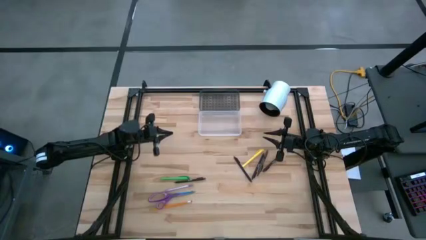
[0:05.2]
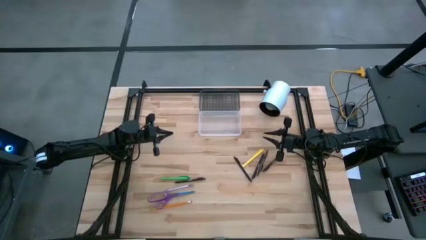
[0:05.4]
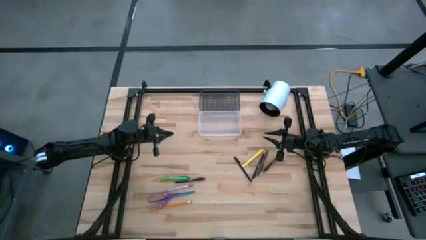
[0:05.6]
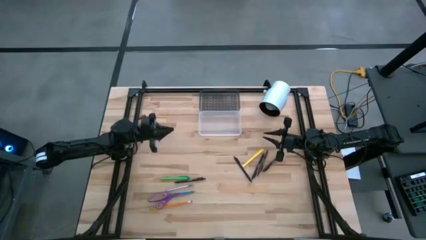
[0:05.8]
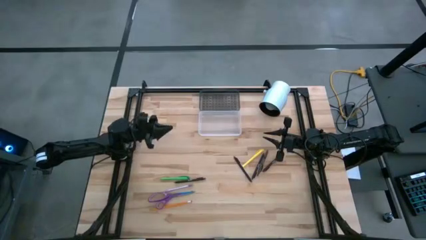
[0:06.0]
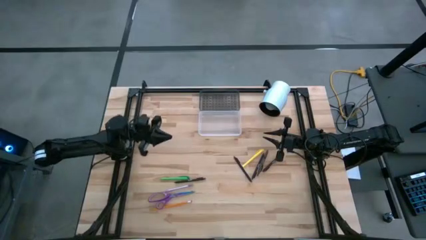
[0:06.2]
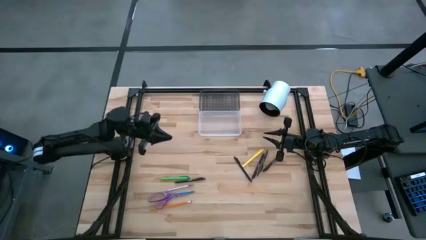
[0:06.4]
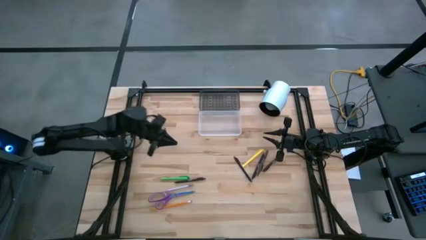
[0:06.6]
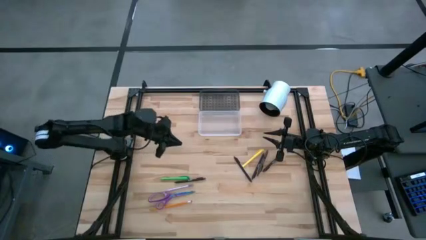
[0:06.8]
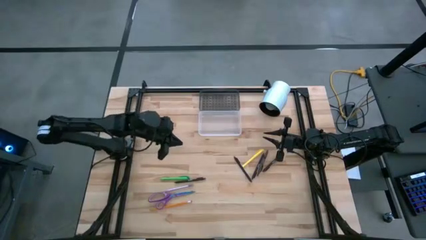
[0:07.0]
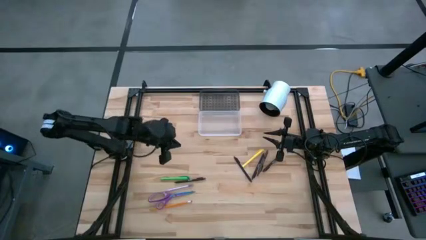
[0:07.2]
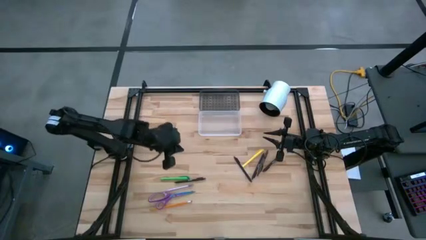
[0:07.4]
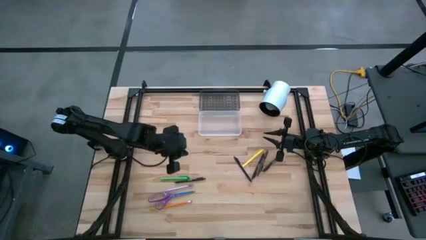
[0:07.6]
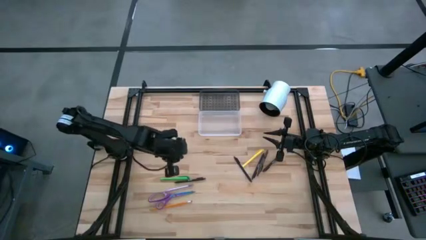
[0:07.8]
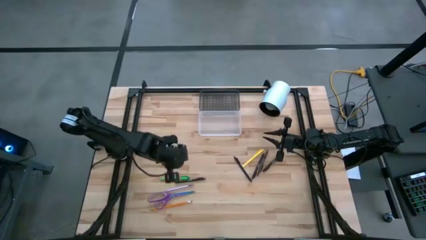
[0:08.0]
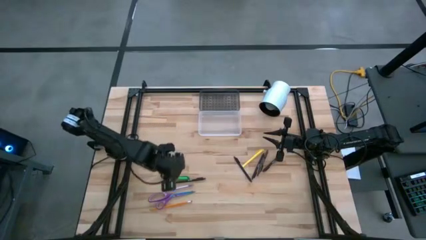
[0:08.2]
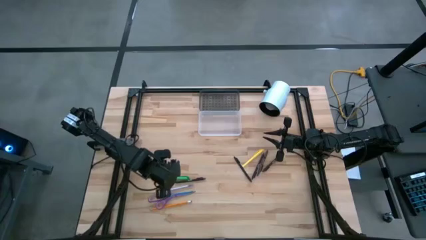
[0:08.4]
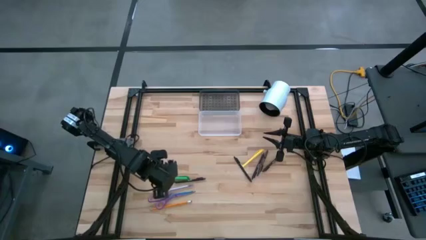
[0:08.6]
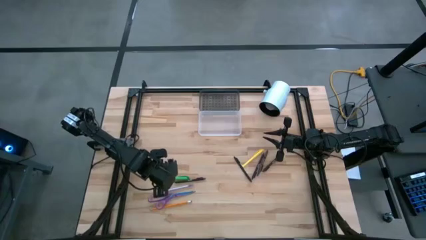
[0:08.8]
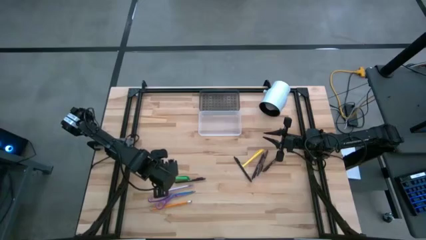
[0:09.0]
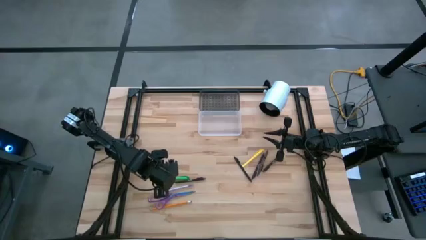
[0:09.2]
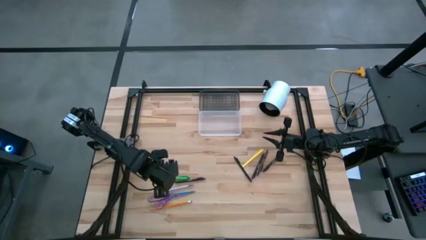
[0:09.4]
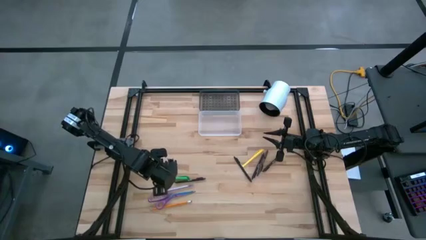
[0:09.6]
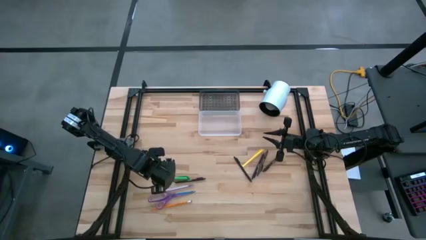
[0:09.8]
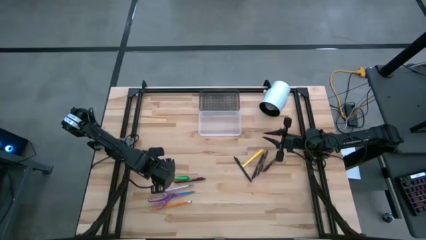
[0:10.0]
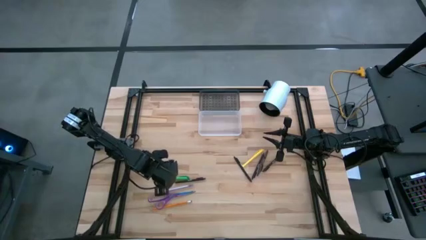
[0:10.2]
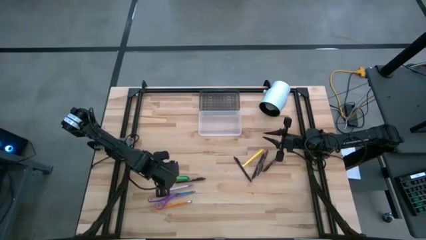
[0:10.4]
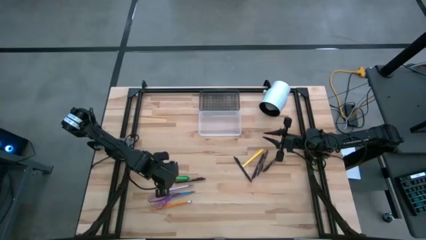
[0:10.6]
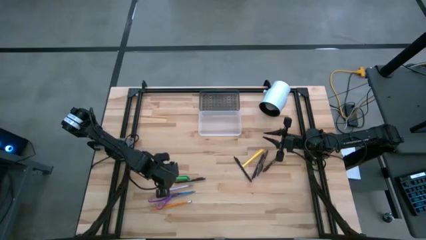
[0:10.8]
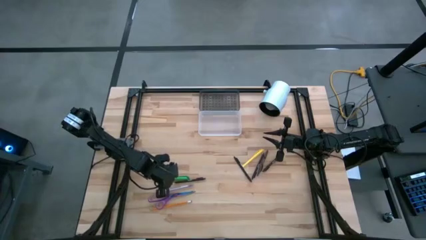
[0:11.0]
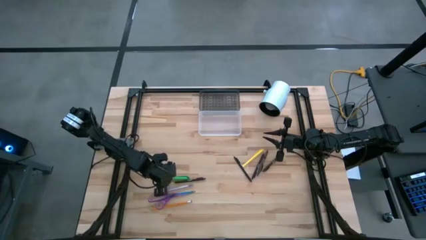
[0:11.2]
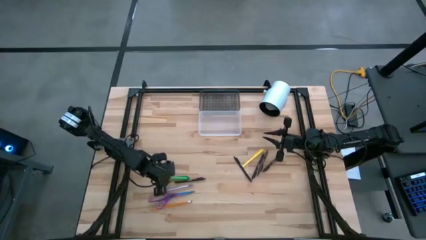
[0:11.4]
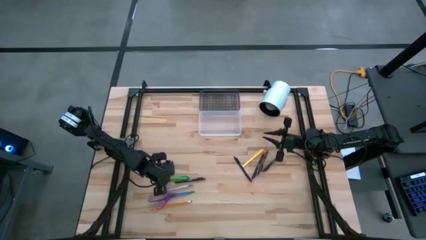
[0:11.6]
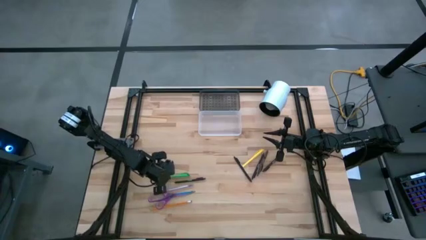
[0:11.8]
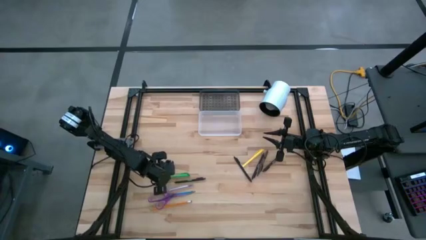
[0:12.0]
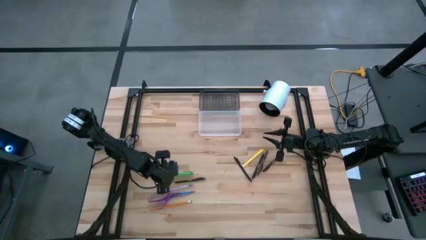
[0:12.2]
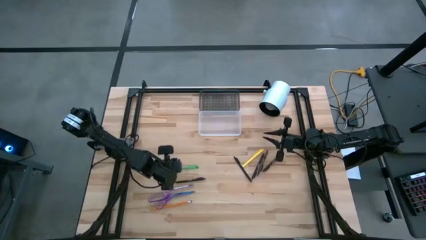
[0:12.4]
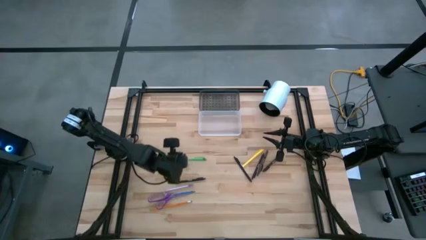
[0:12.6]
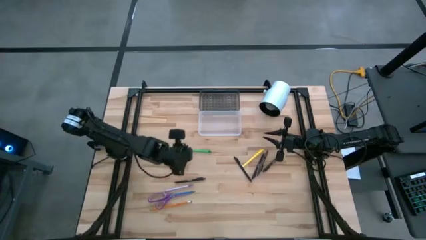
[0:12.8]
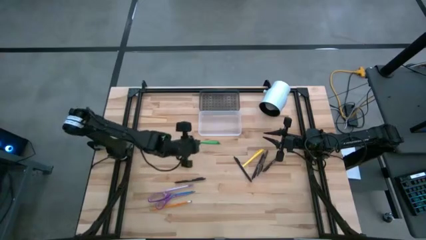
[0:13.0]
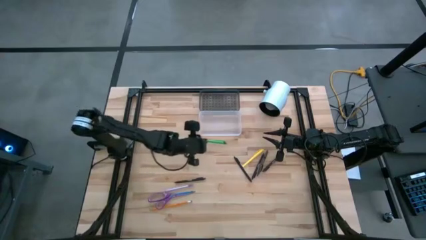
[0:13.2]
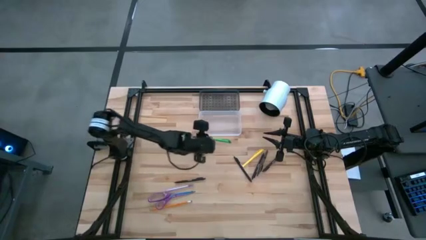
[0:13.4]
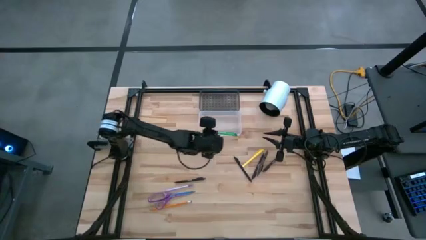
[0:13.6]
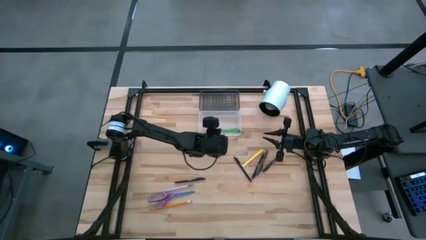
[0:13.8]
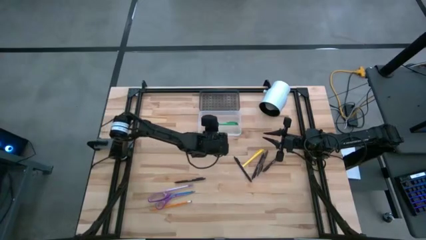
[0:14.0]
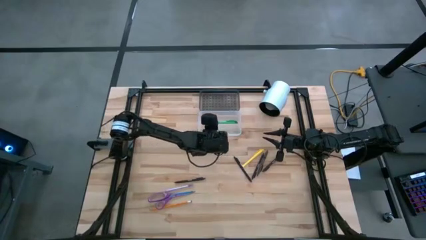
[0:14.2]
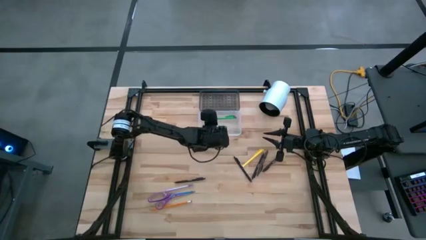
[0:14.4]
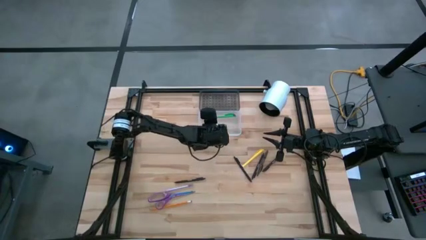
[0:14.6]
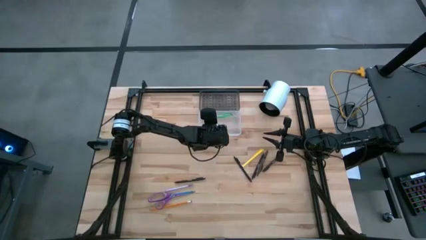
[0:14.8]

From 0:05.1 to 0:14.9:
Task: Pick & place school supplies into a supply box
Put the green pen into the black box

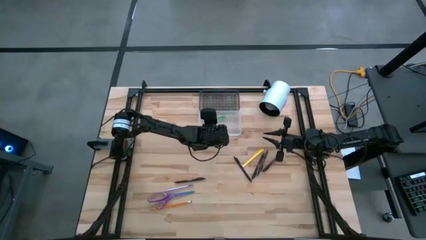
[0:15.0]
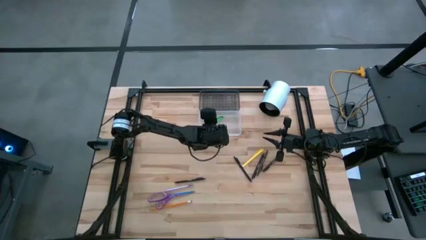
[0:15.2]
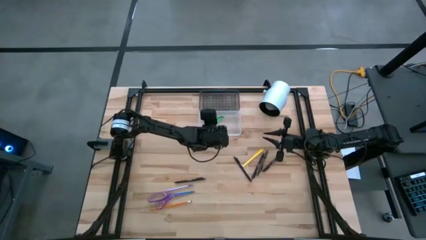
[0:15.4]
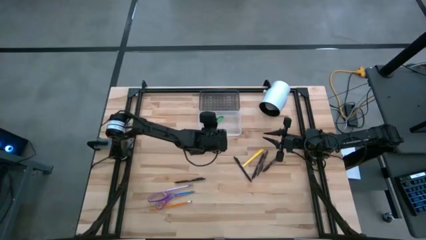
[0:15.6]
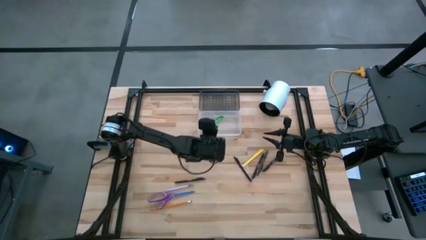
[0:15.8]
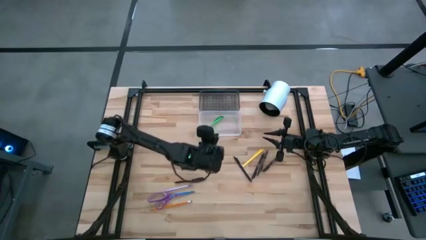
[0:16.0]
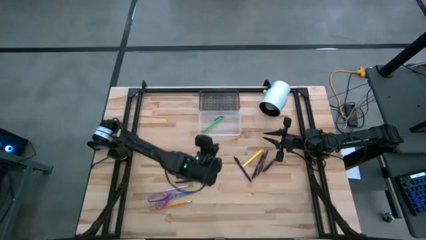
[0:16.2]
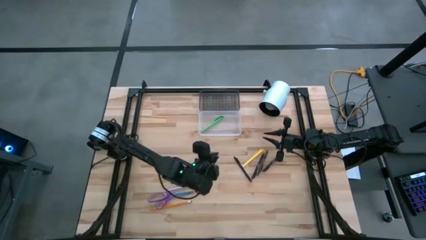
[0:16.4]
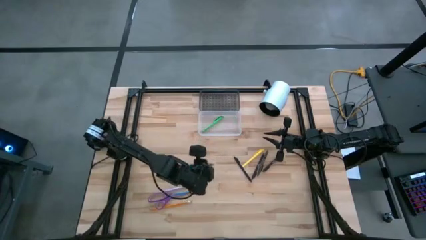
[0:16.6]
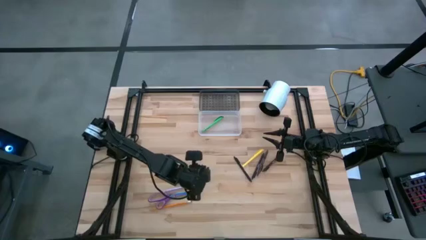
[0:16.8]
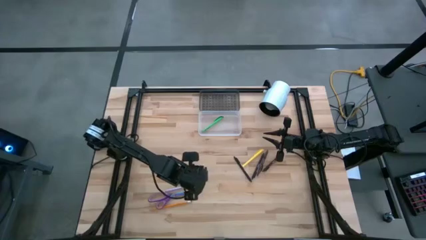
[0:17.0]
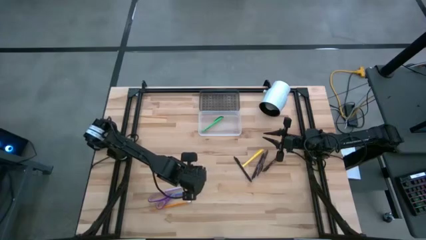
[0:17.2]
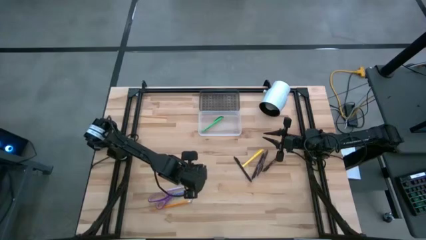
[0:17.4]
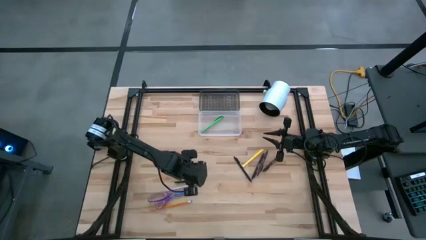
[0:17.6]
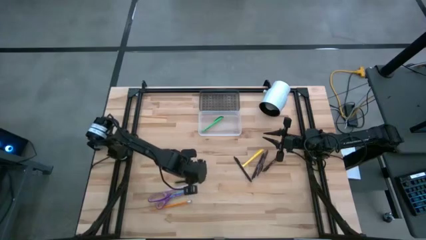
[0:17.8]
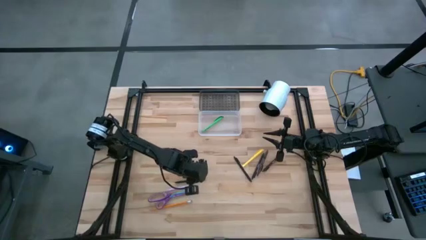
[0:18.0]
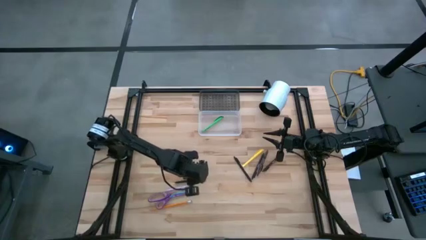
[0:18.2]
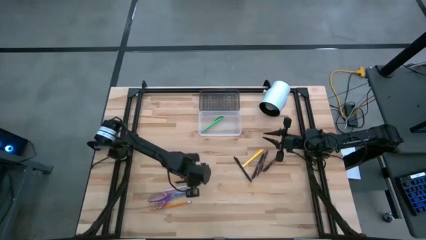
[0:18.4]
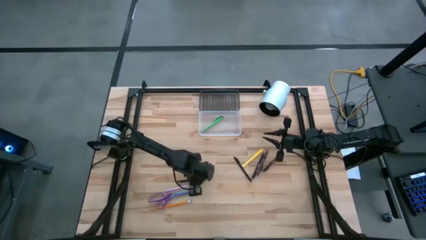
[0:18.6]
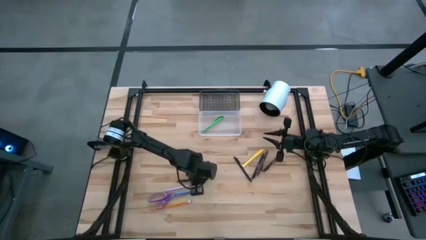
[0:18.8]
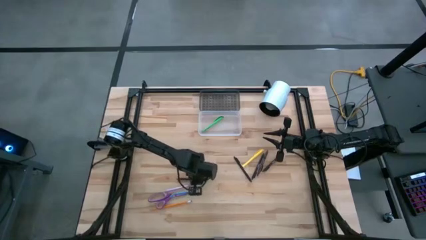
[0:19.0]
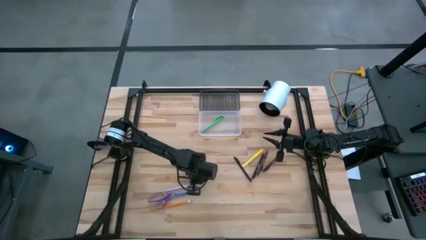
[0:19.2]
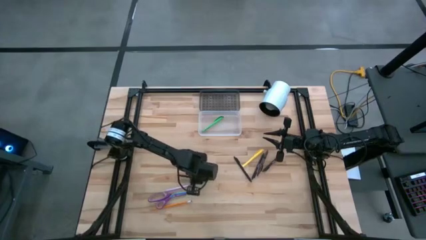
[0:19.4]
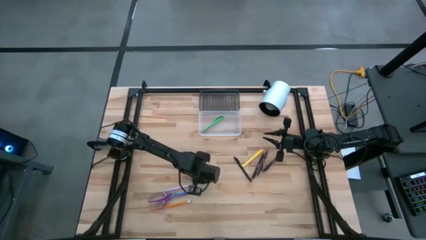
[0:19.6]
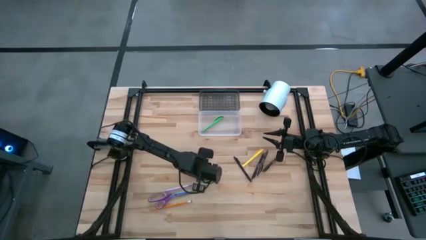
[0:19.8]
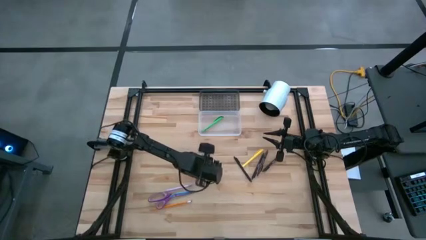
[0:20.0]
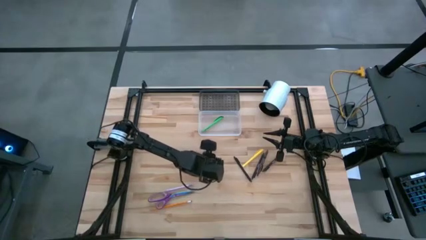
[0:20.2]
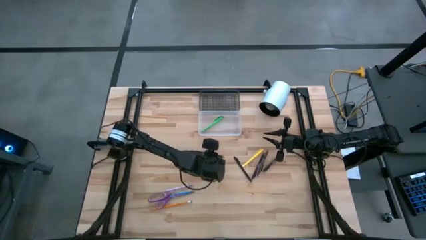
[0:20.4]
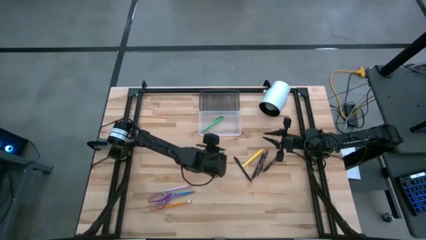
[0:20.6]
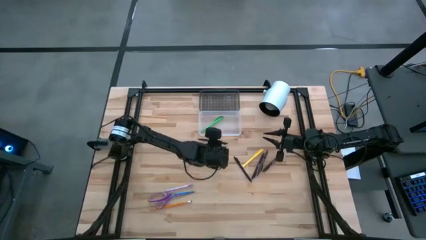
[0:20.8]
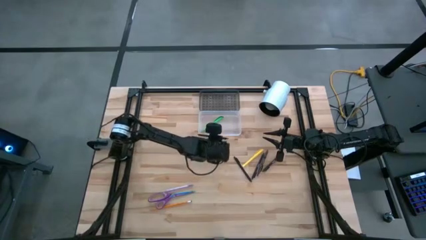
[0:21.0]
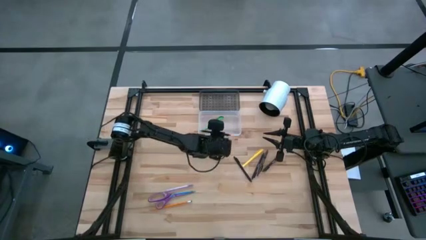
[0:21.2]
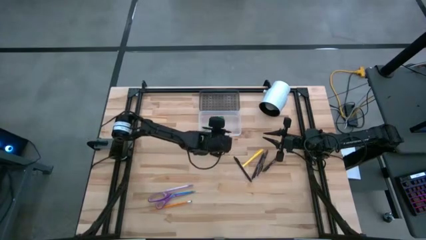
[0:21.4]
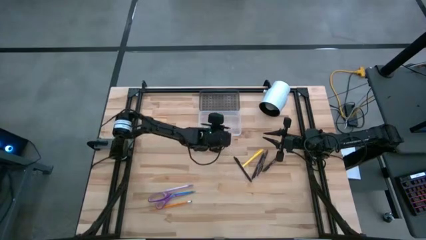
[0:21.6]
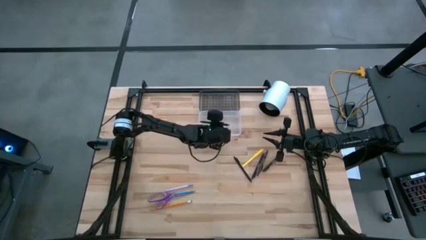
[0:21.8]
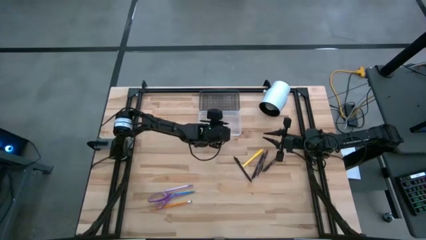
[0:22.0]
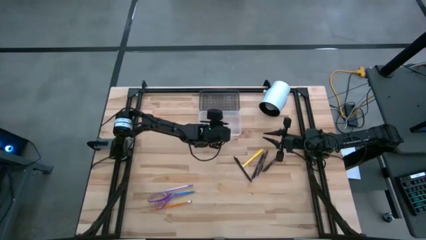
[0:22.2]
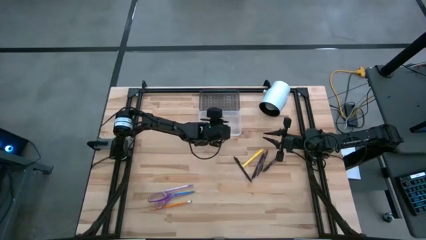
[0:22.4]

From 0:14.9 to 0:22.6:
Put the black pen into the black box
